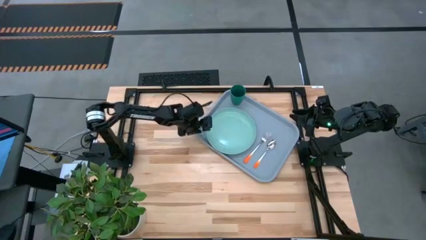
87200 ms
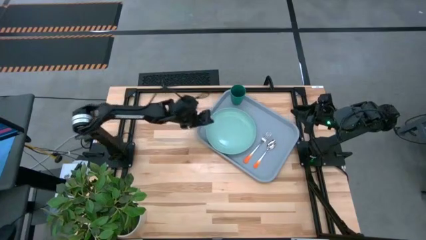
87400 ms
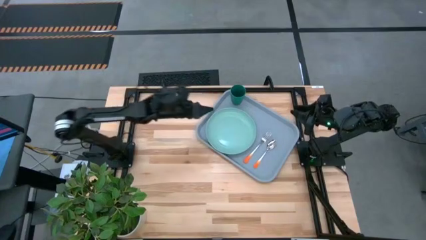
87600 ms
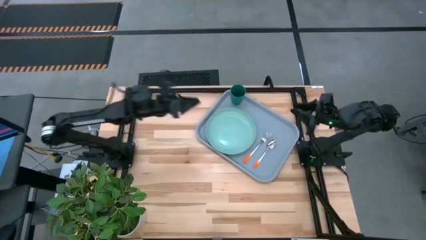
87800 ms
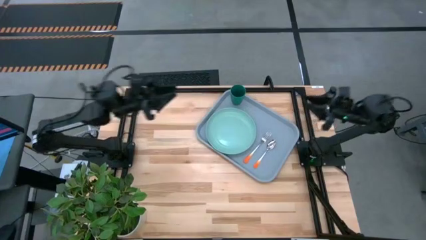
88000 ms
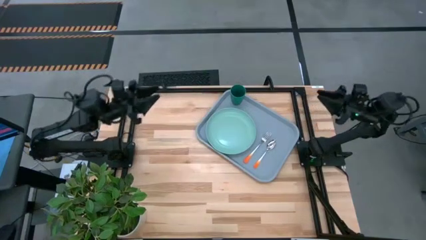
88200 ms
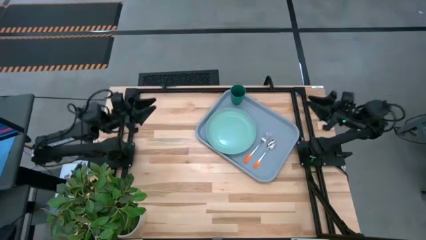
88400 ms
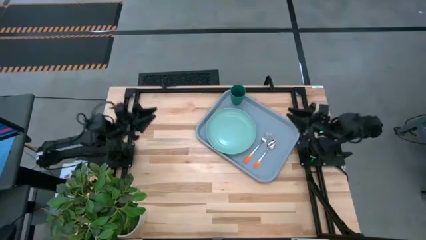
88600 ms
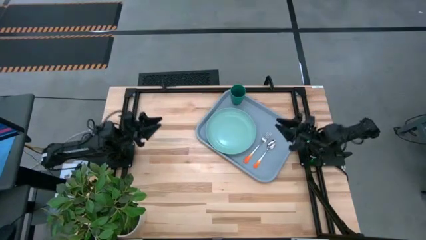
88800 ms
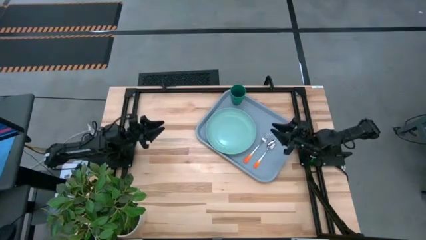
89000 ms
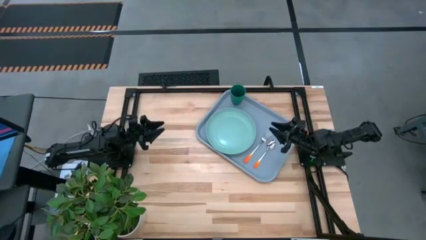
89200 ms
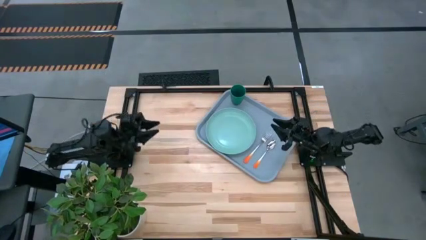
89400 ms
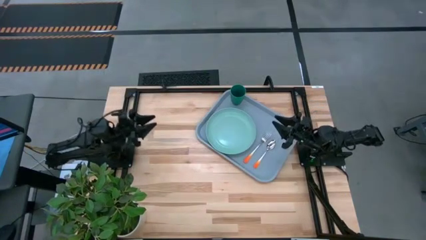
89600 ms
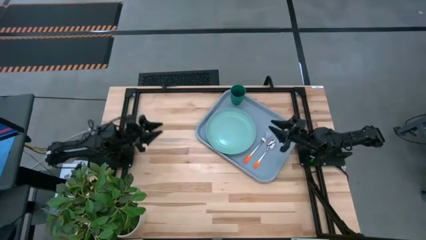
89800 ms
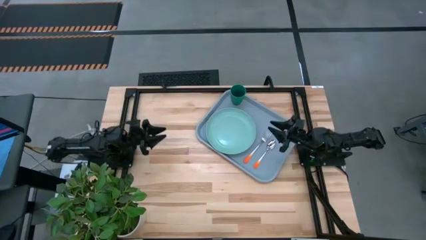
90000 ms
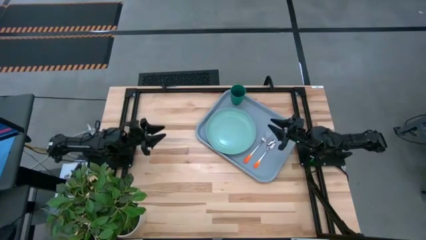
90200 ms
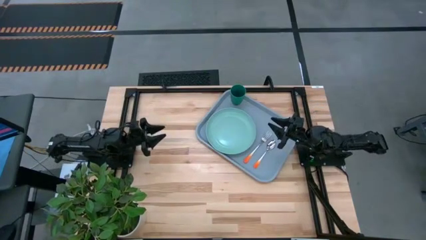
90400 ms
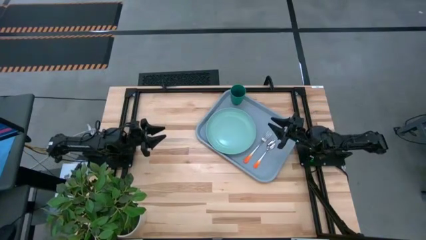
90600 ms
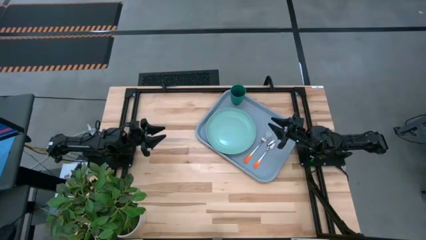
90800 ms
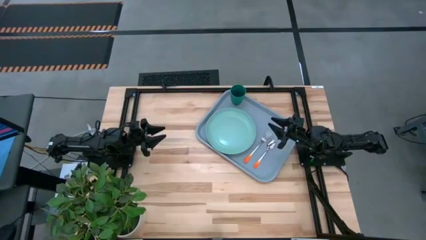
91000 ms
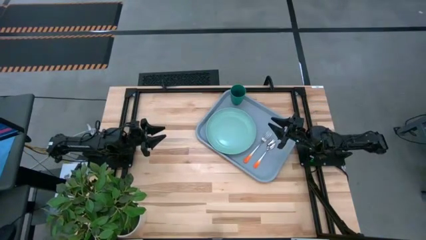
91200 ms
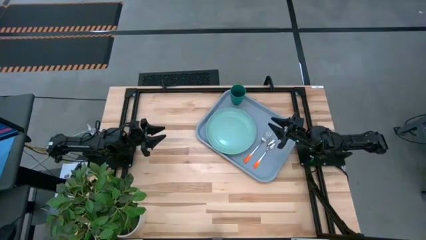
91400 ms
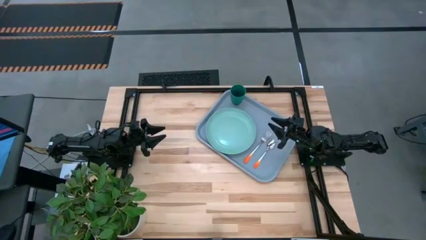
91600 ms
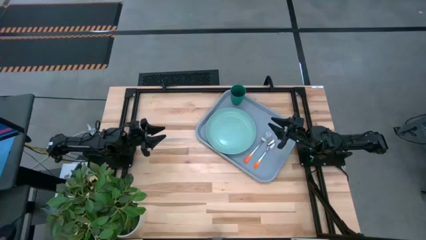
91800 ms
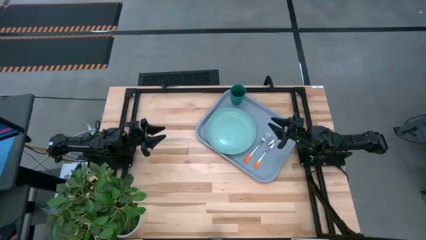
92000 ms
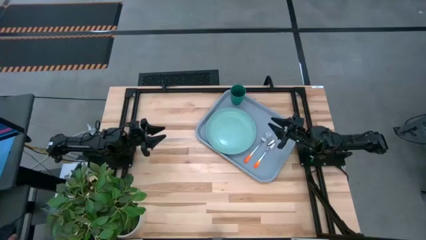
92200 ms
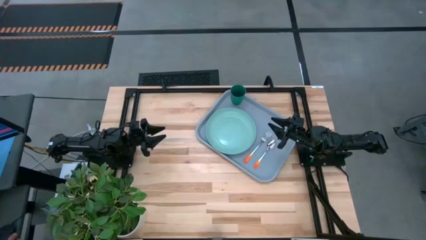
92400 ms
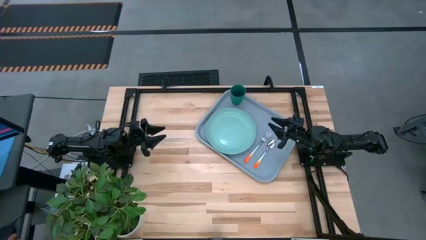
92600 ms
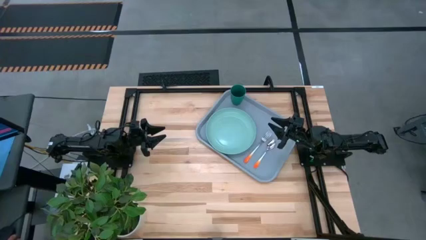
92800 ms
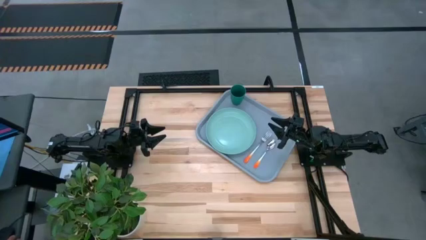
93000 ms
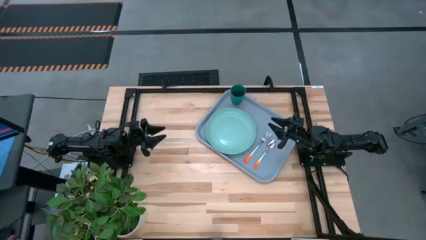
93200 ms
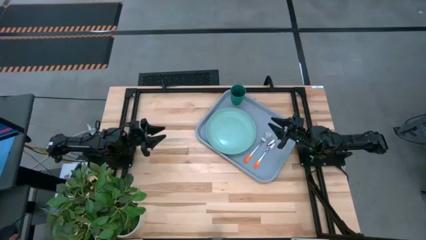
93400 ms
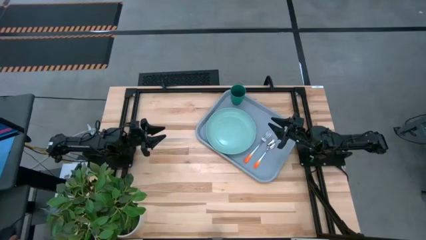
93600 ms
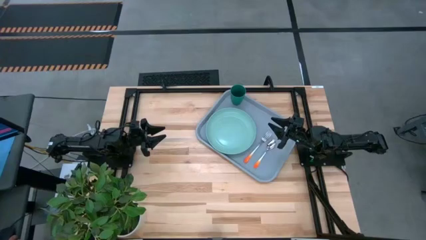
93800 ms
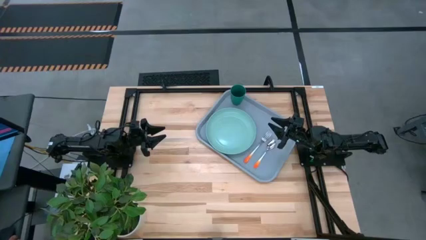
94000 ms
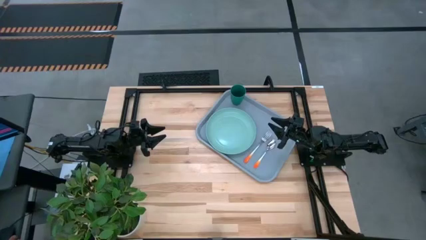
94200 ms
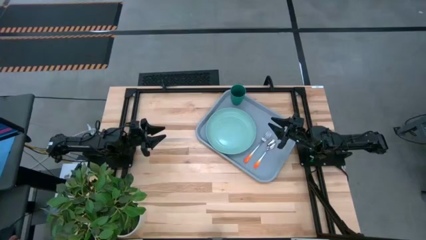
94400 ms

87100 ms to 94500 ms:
Task: Pick and place plate/cup/fork/spoon on tray
Return to Home Position

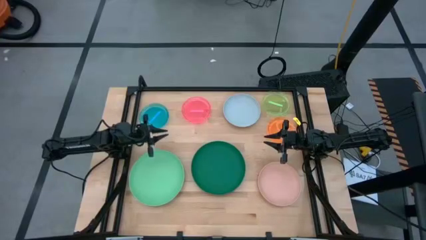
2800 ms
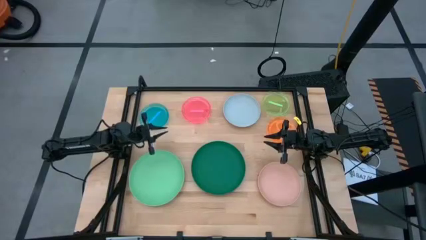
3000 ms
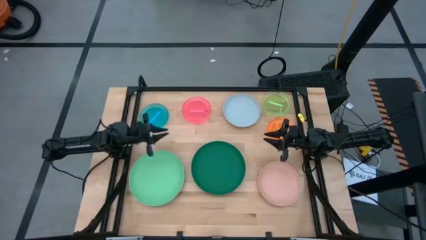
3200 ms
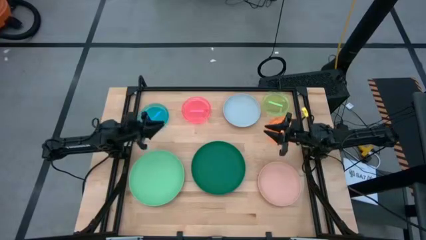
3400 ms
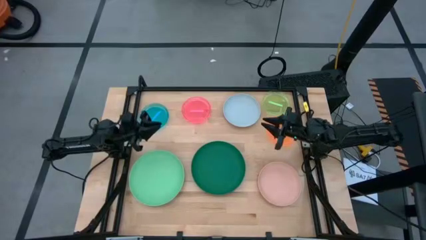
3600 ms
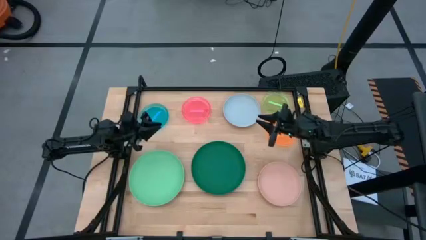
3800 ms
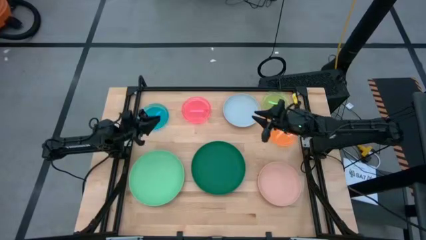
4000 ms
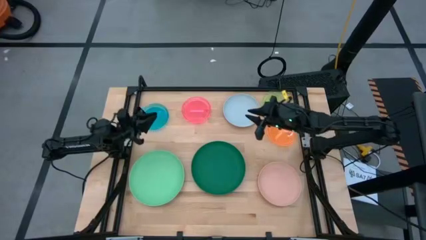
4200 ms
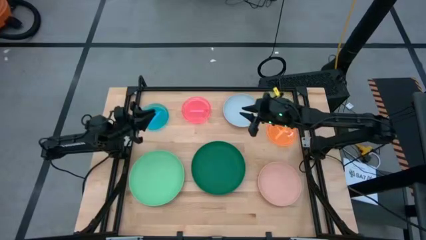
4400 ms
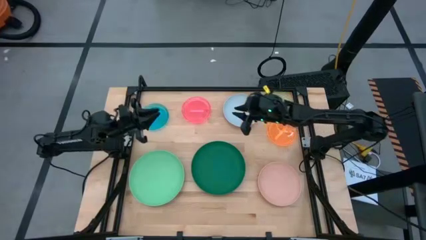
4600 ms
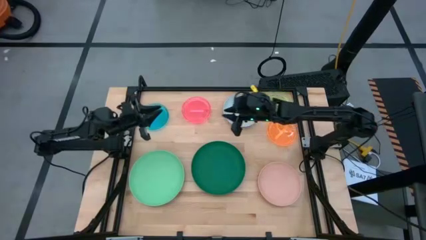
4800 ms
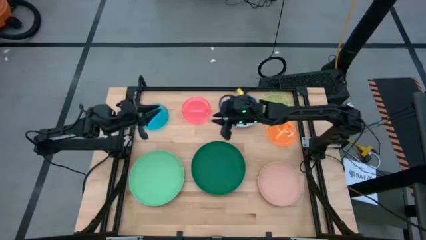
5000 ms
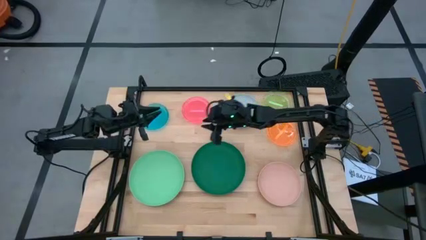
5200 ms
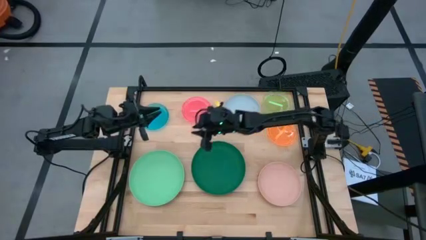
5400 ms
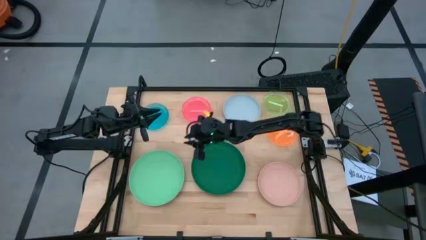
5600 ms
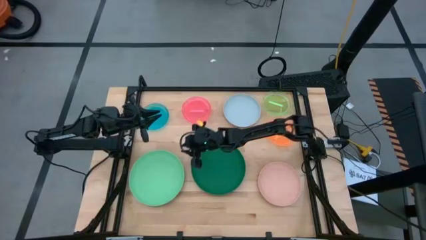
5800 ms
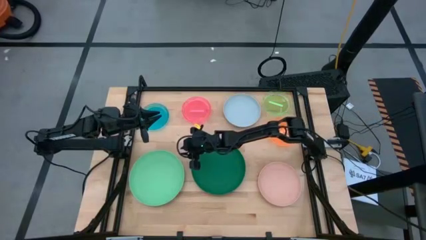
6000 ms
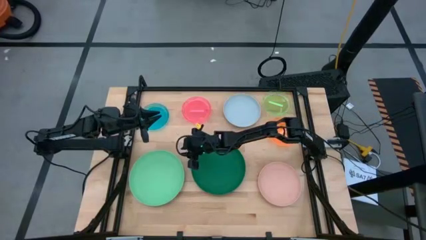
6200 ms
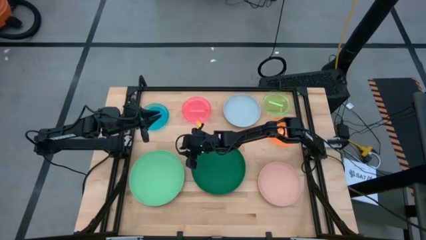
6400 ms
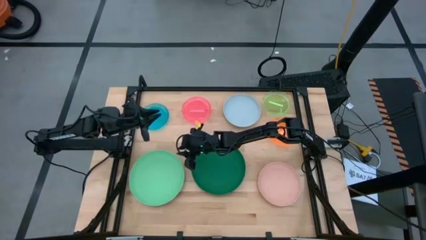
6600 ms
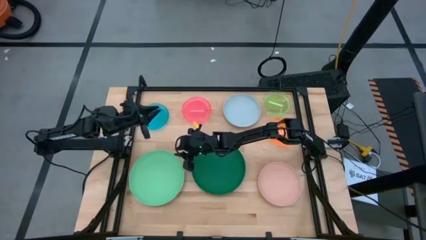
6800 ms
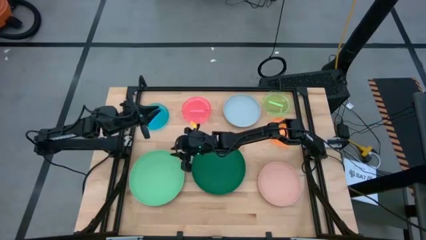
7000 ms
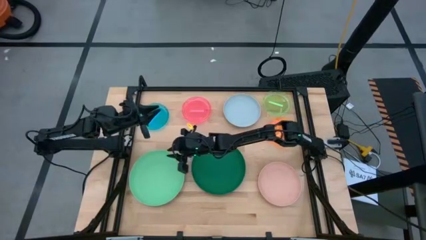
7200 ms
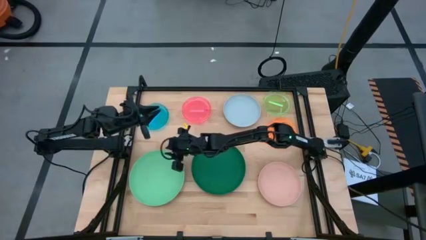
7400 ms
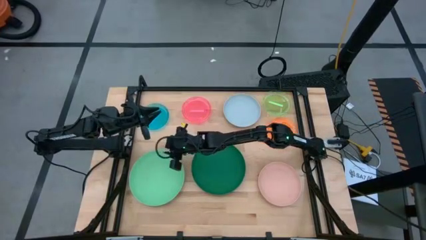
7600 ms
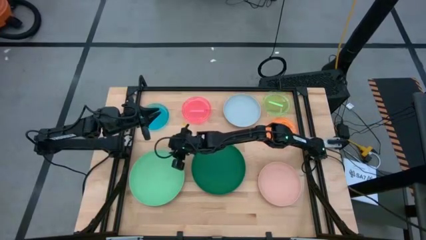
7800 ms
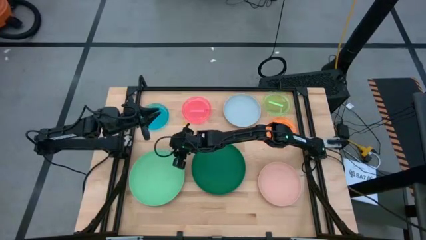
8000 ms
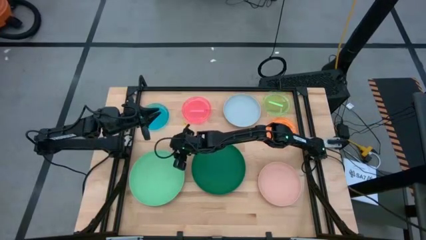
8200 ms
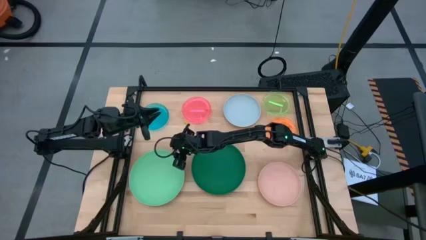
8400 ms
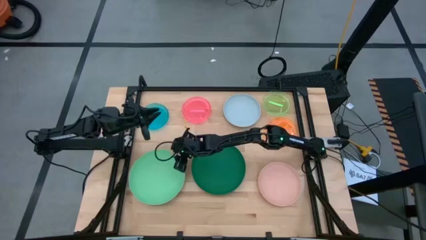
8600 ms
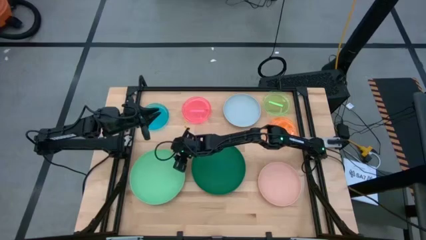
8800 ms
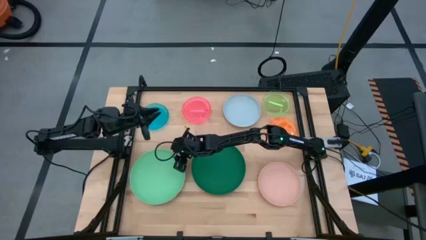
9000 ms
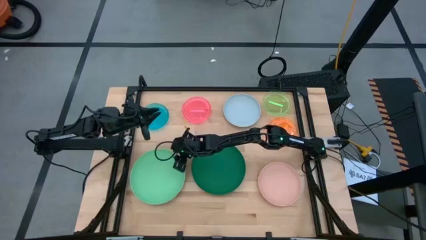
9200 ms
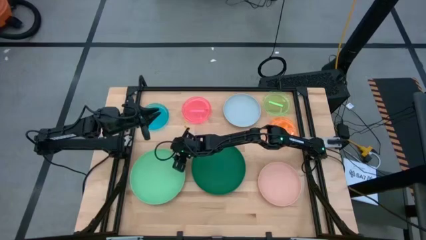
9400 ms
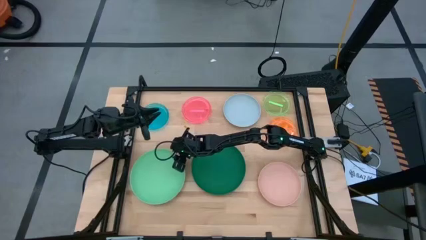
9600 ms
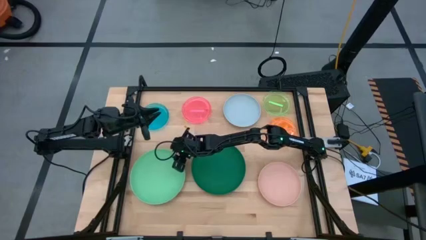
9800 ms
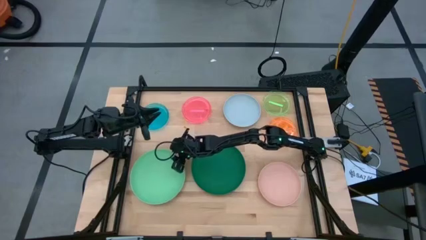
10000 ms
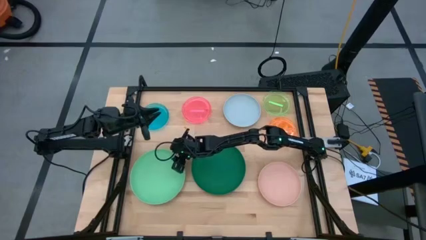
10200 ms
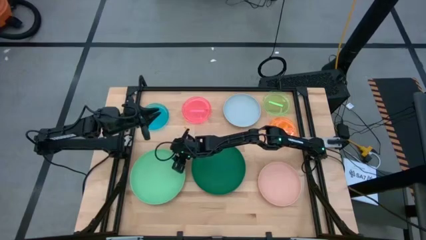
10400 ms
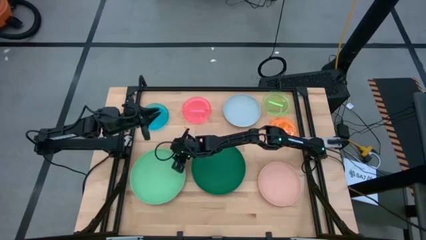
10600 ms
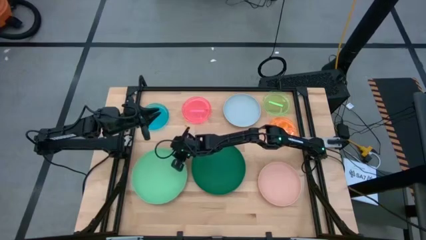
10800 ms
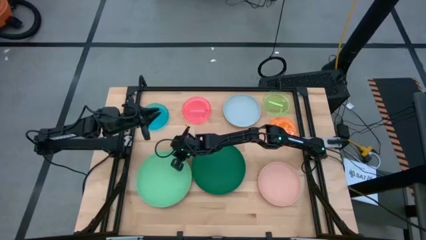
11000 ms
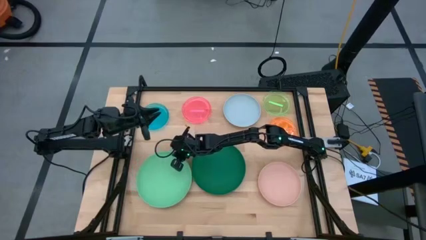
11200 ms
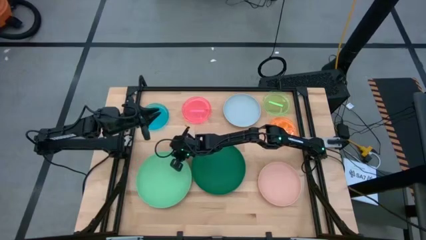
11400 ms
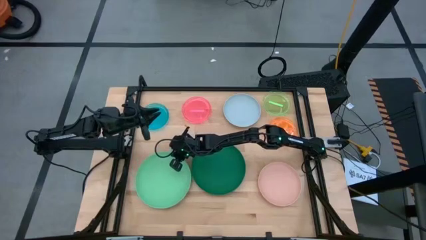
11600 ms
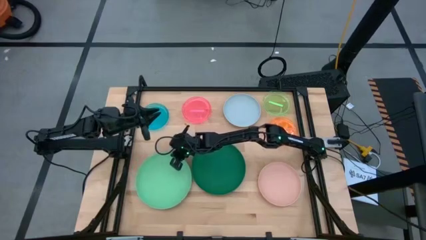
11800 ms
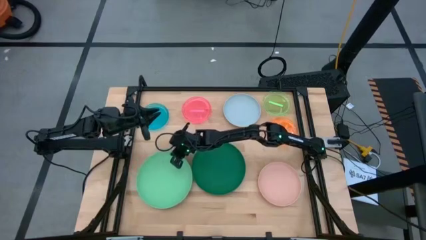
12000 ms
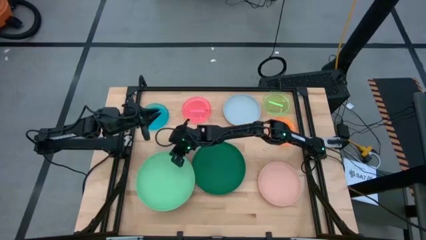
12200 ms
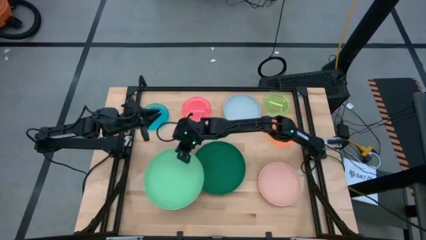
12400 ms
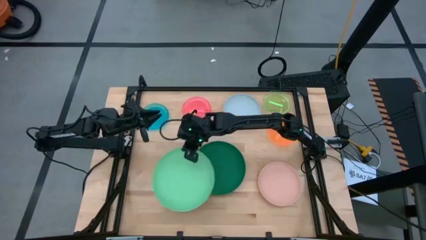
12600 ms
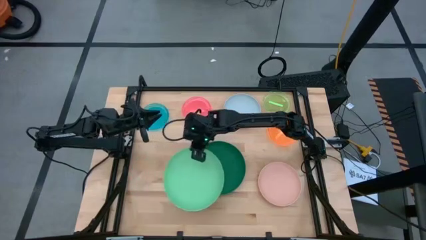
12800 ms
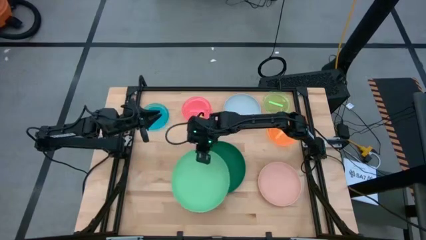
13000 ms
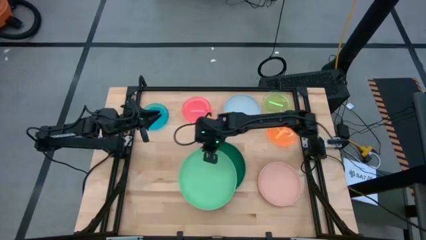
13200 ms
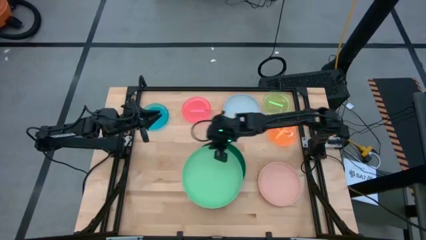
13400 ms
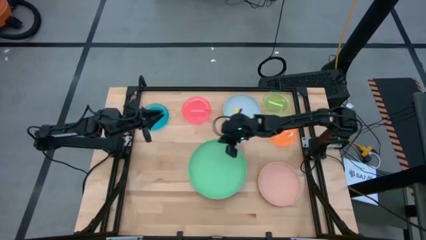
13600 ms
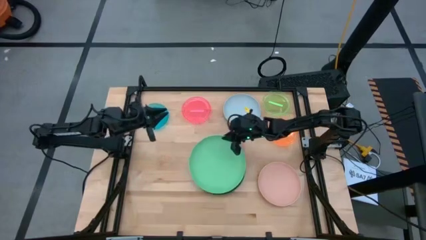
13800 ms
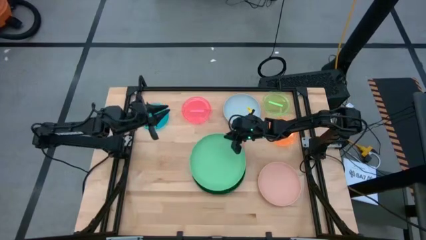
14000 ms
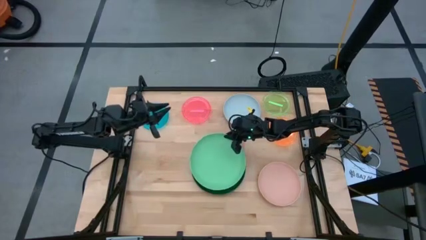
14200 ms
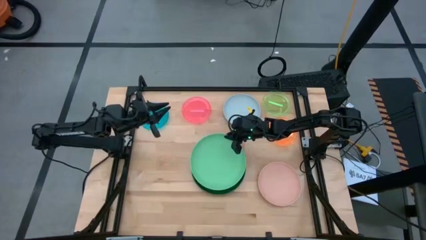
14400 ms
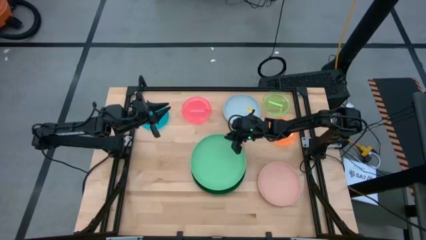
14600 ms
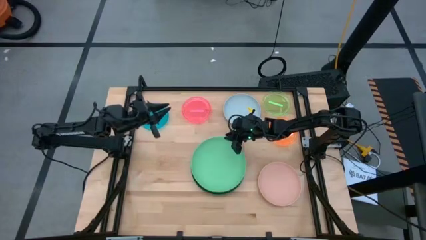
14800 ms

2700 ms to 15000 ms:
Task: Stack plastic plates
Stack the green plate on the dark green plate
